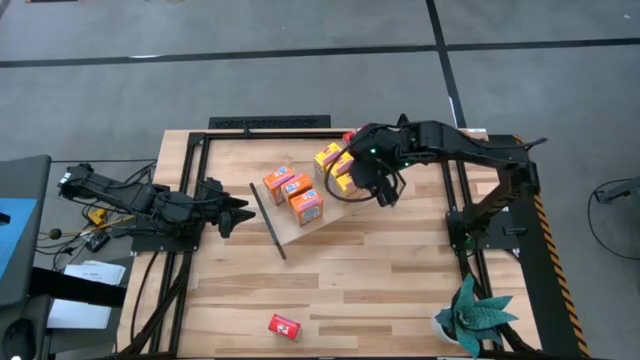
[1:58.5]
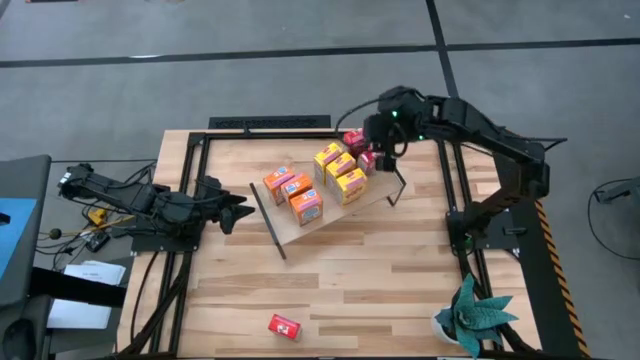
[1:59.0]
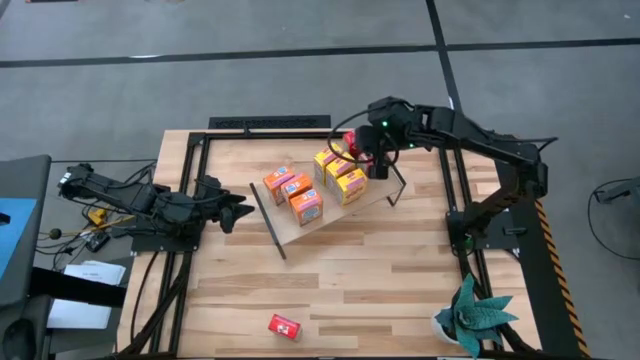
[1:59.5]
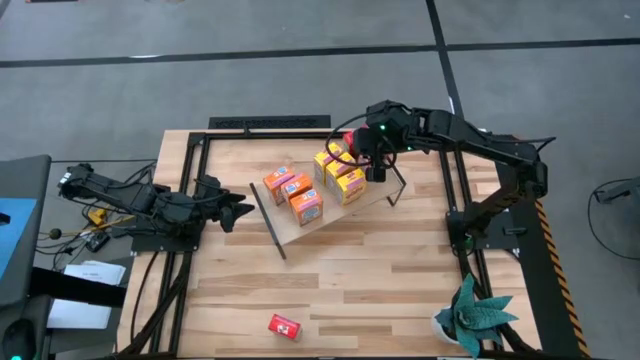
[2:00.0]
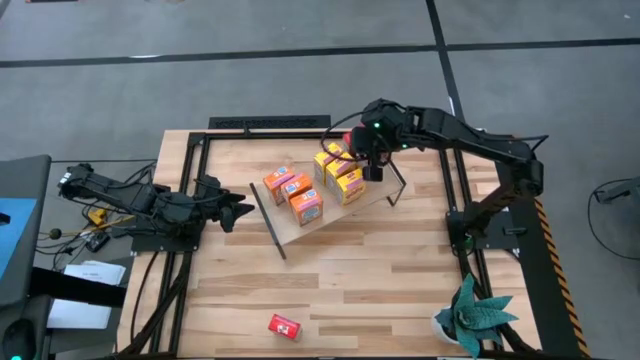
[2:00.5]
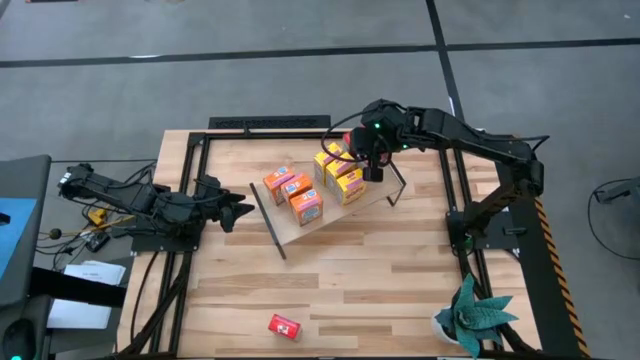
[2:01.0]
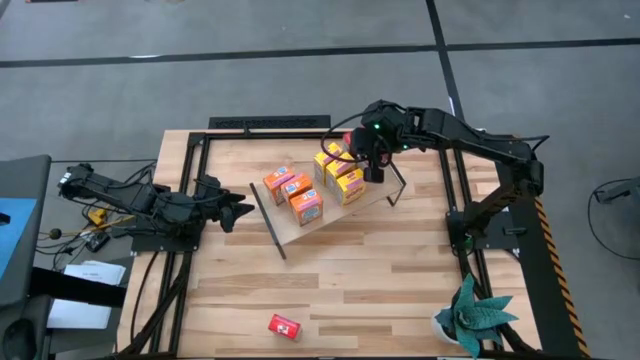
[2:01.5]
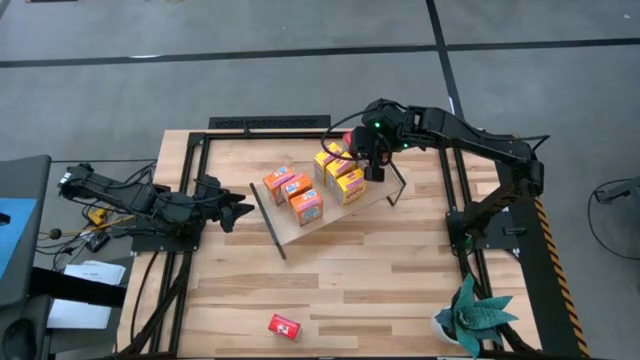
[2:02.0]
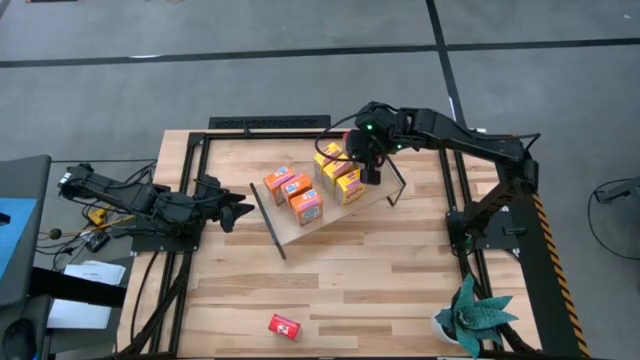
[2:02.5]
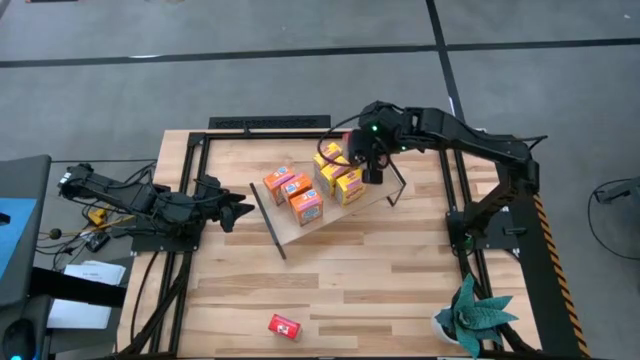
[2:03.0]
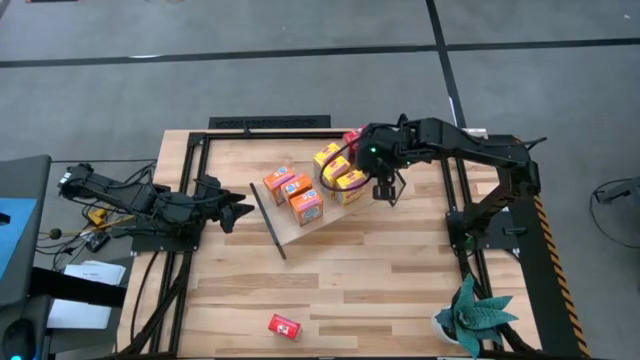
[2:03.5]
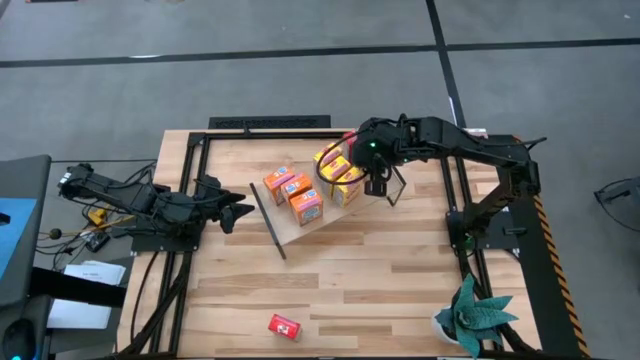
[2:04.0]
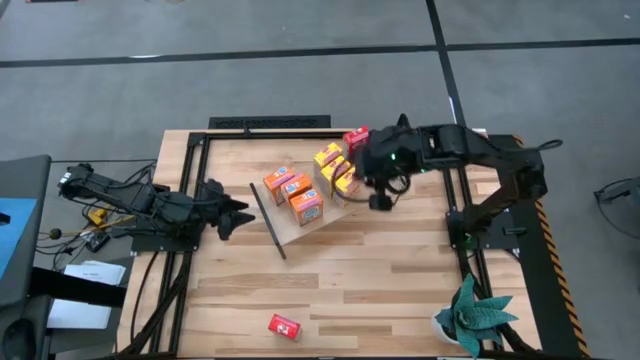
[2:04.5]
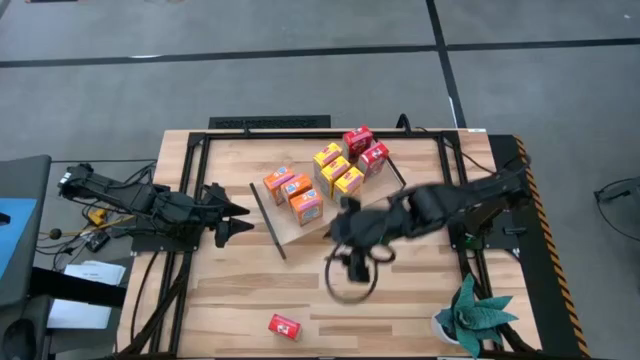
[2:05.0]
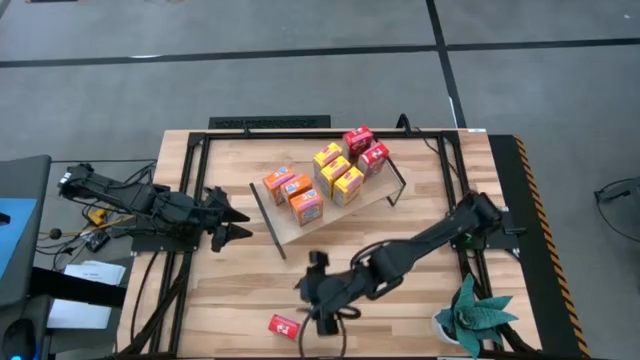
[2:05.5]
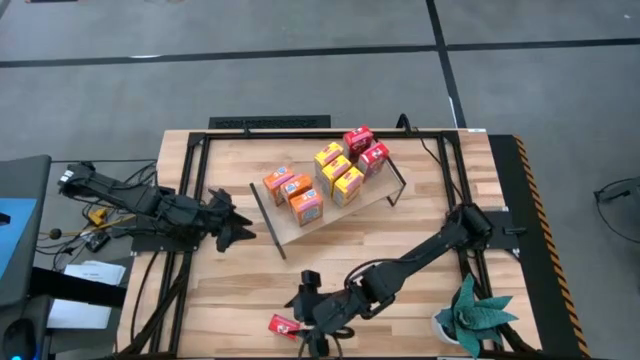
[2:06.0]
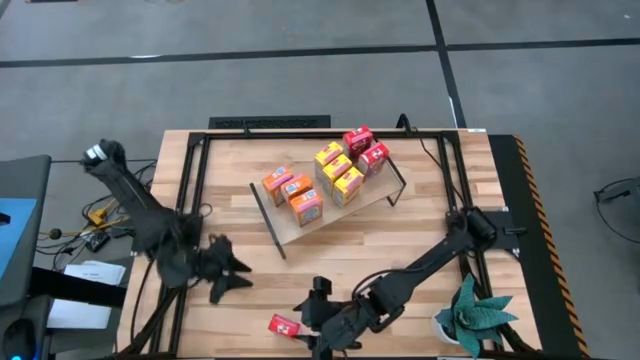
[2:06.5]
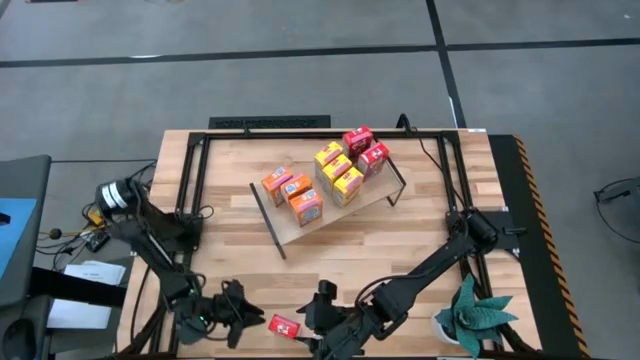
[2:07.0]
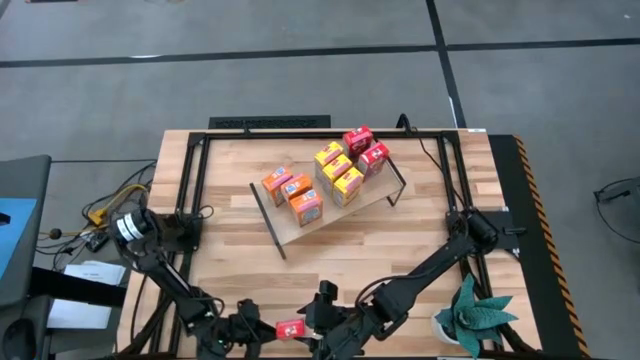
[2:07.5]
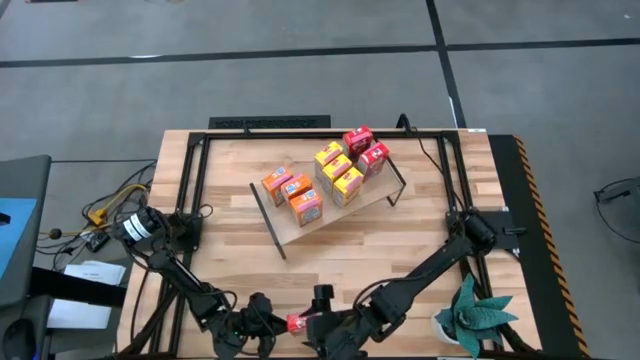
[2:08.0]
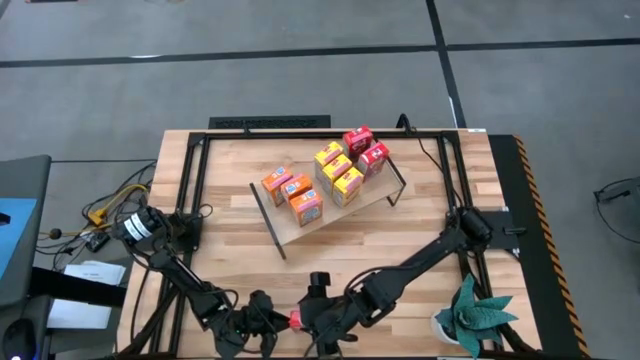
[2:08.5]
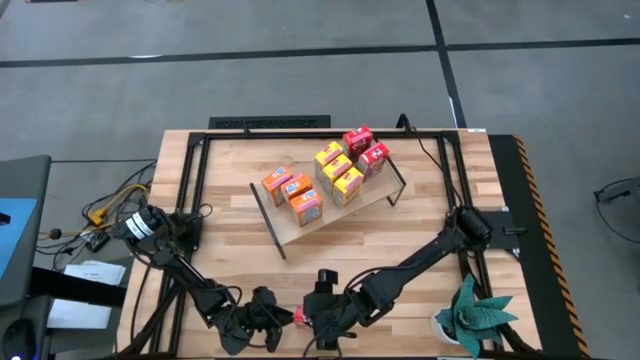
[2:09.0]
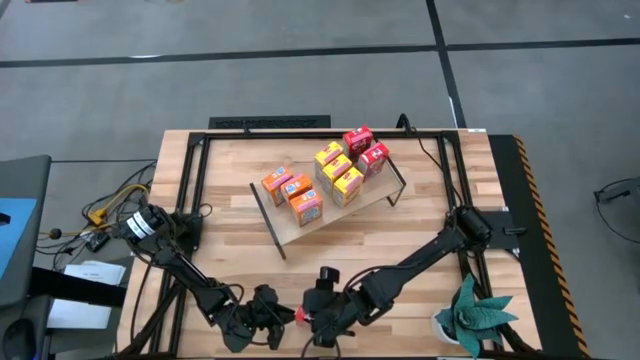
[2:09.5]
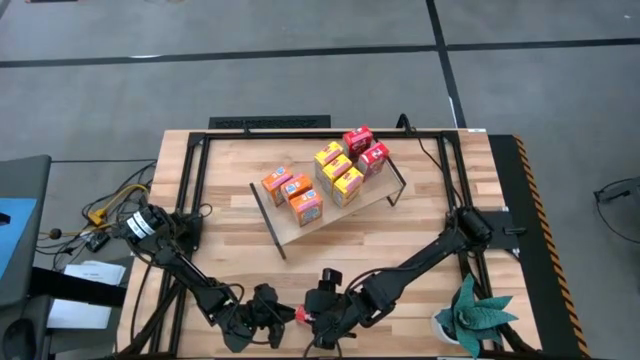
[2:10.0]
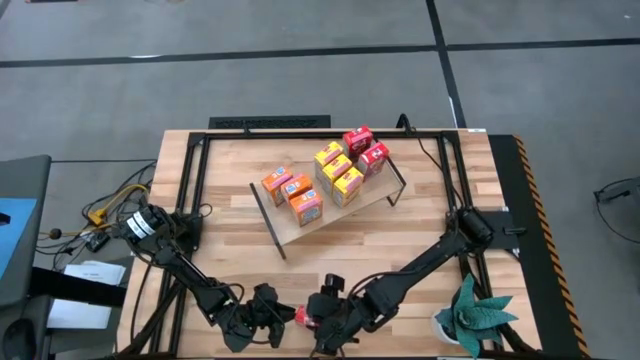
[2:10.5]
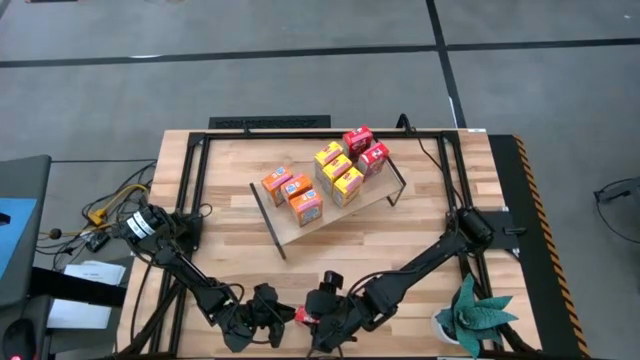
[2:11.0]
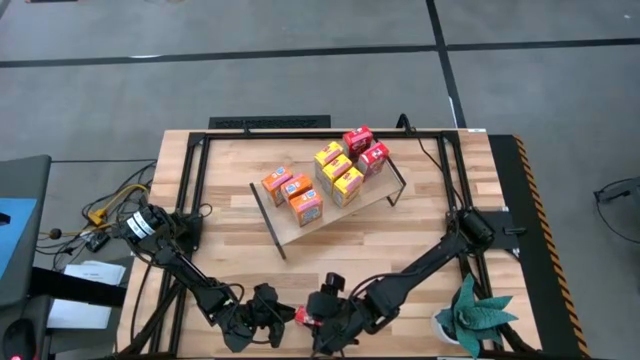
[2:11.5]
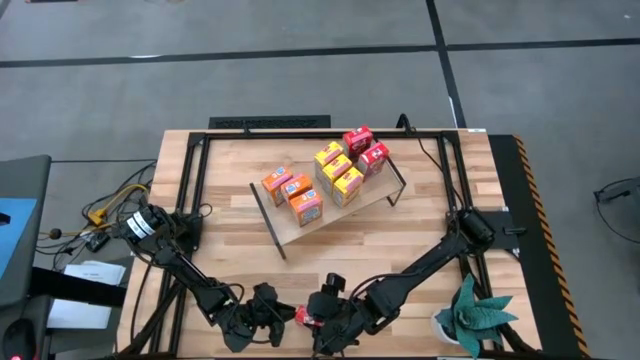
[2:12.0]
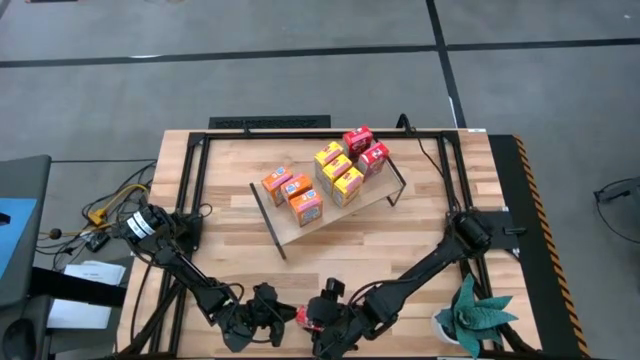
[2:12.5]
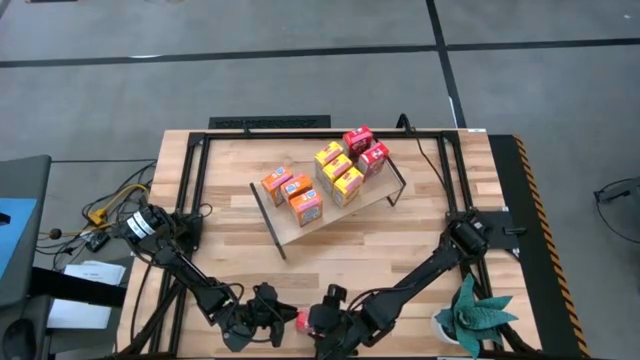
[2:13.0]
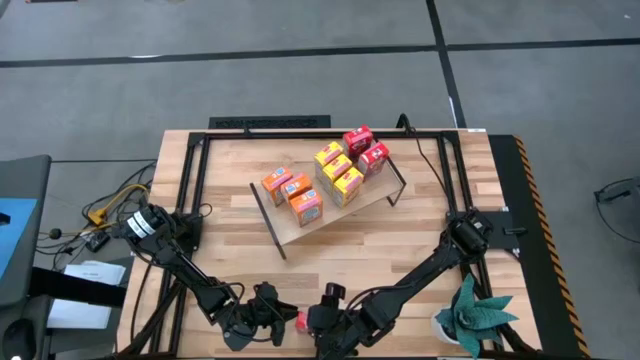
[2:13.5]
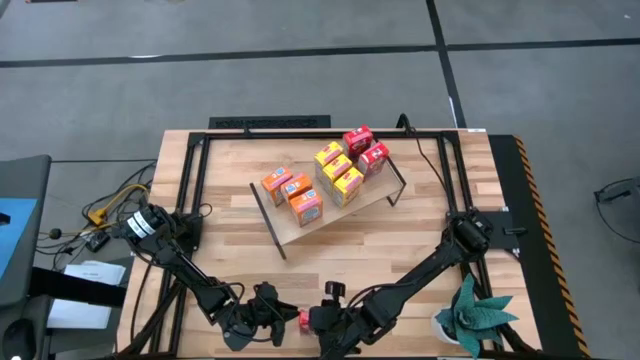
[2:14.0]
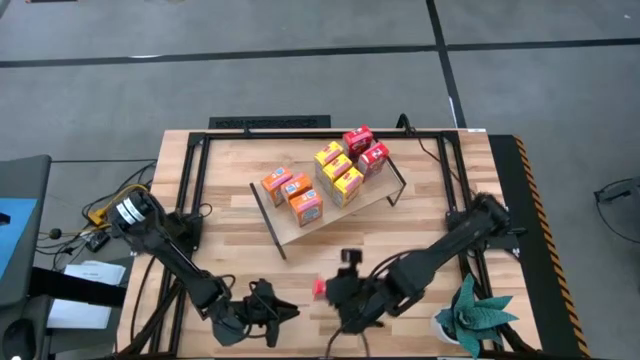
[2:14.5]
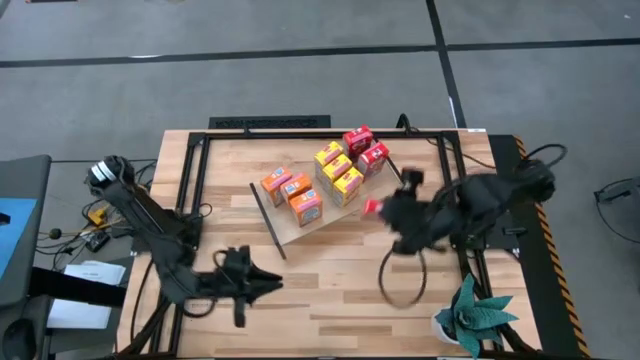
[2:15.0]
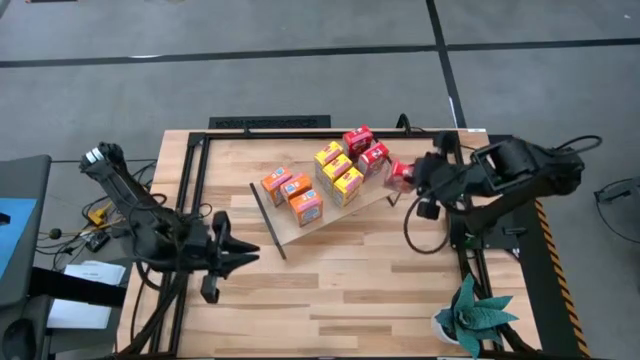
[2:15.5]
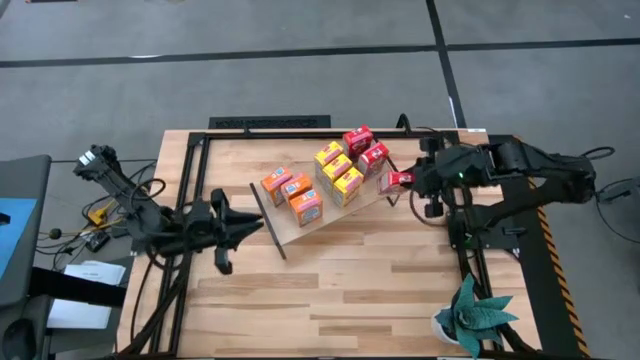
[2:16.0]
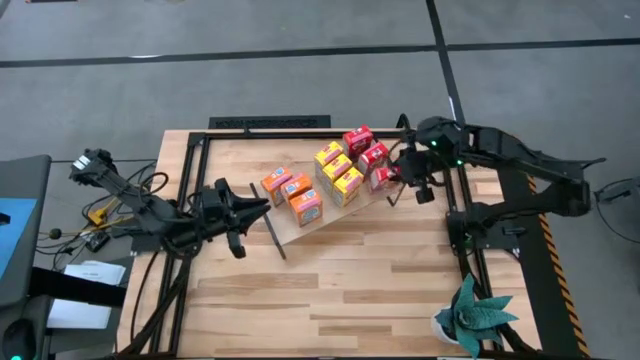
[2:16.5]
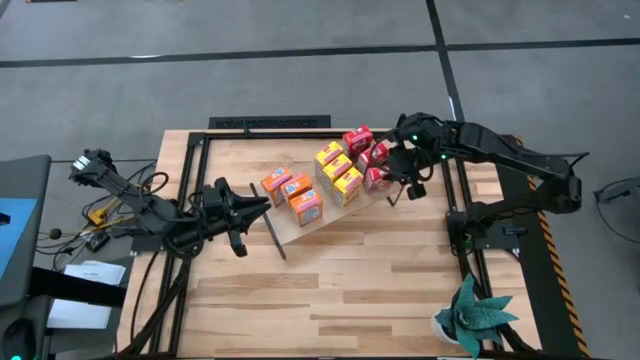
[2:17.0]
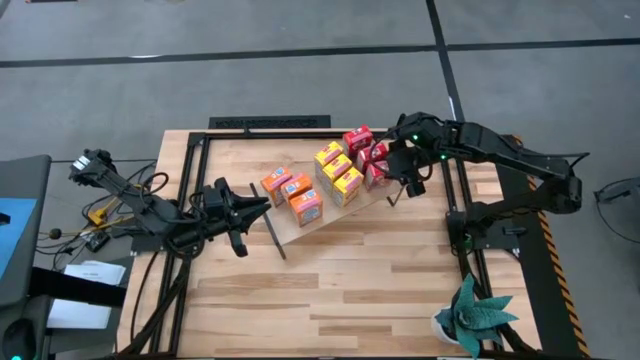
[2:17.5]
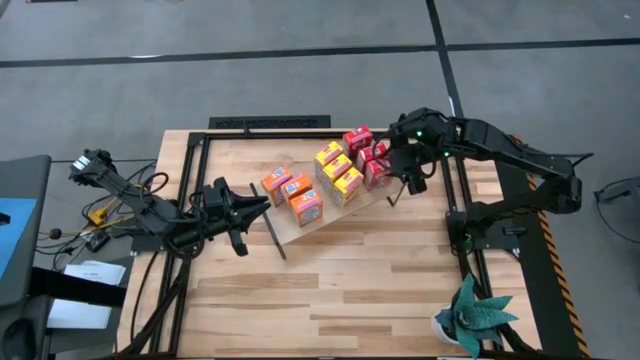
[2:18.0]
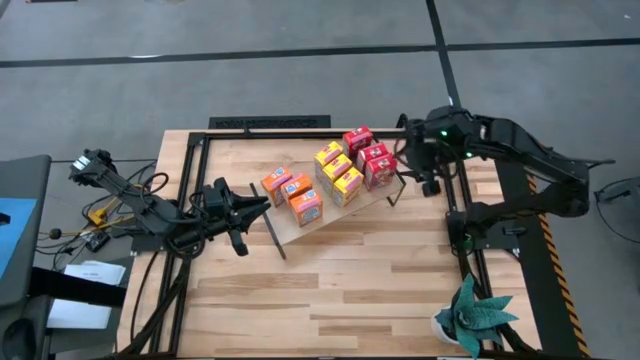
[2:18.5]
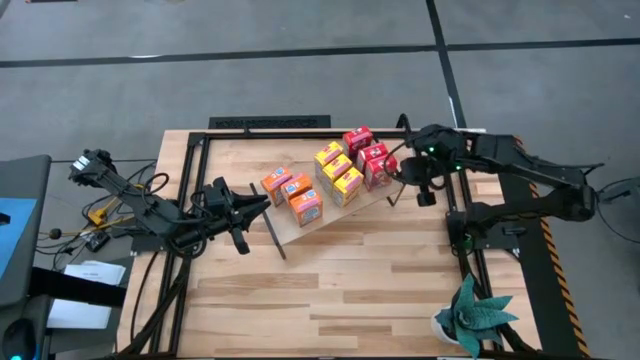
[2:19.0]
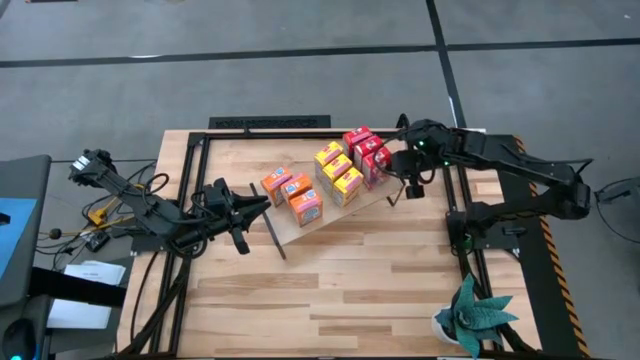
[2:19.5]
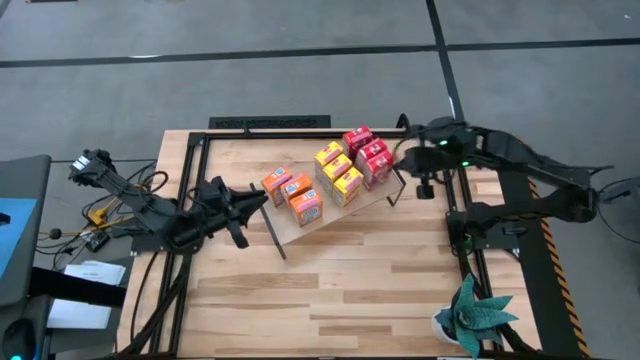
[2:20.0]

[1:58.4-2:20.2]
Task: Stack cereal on shelf
Put the red cereal box on the shelf
